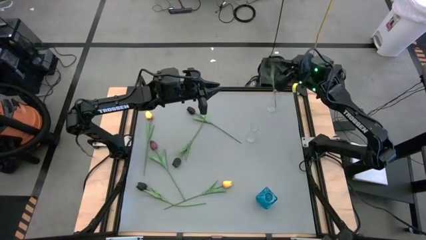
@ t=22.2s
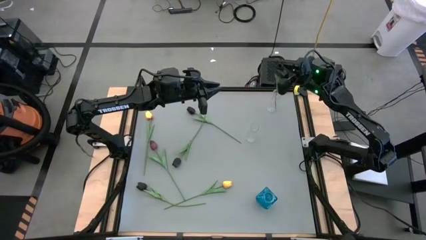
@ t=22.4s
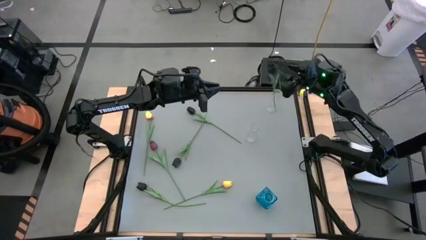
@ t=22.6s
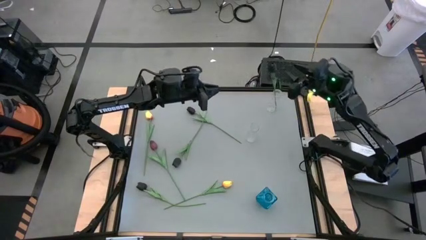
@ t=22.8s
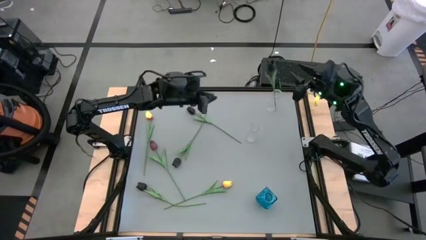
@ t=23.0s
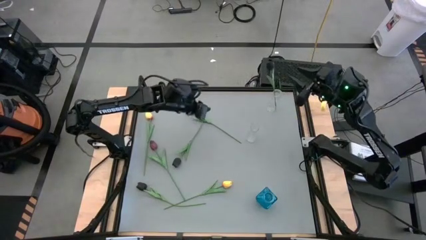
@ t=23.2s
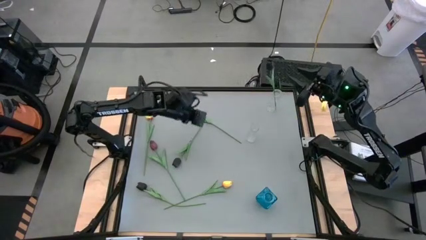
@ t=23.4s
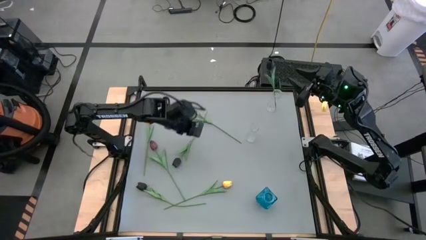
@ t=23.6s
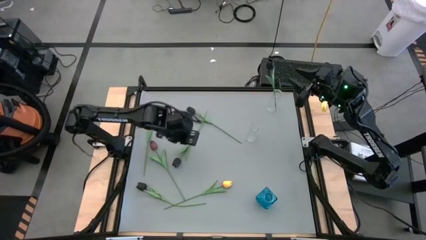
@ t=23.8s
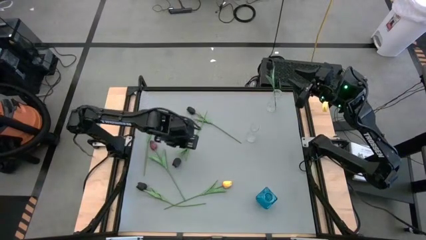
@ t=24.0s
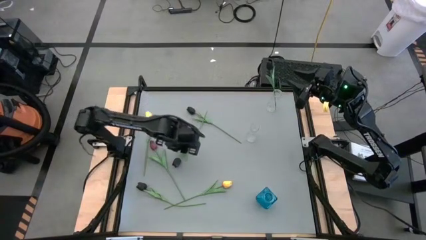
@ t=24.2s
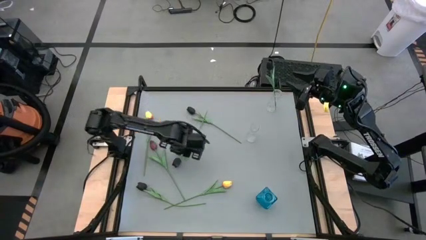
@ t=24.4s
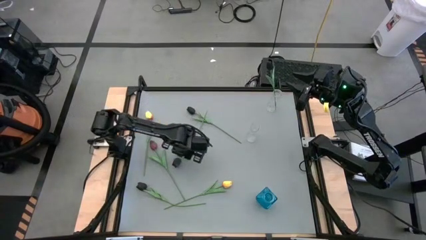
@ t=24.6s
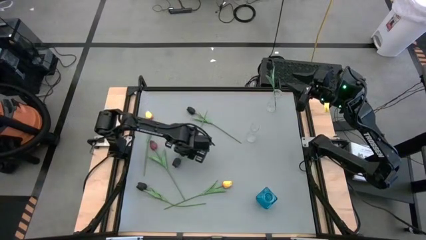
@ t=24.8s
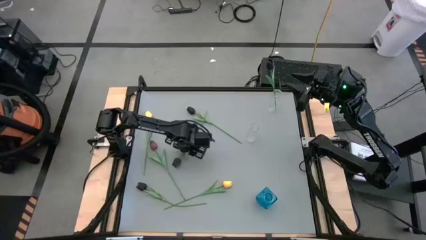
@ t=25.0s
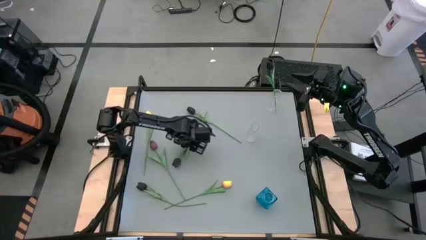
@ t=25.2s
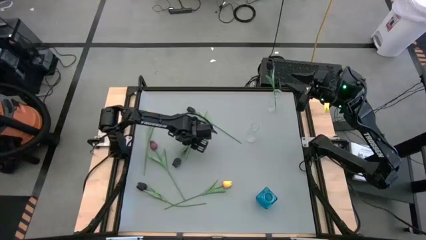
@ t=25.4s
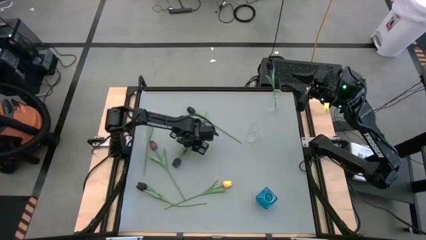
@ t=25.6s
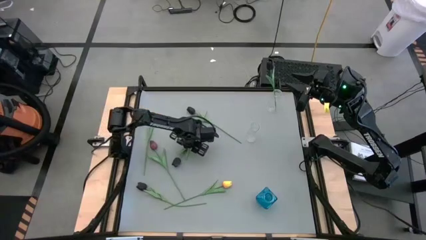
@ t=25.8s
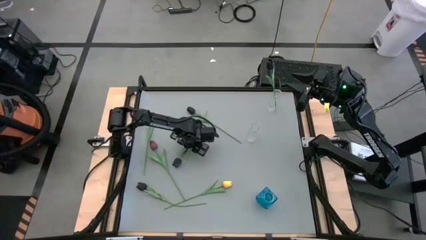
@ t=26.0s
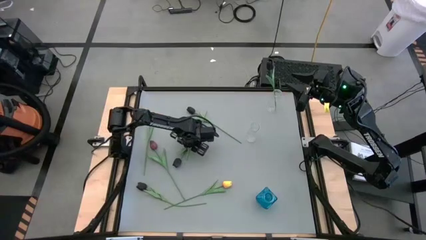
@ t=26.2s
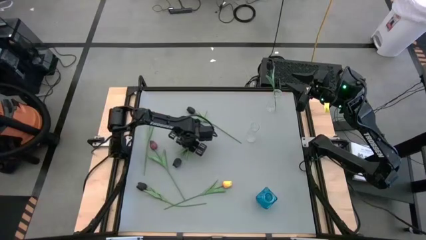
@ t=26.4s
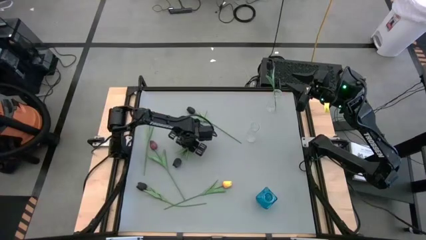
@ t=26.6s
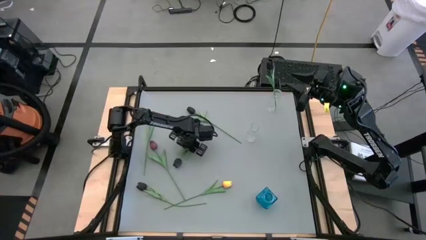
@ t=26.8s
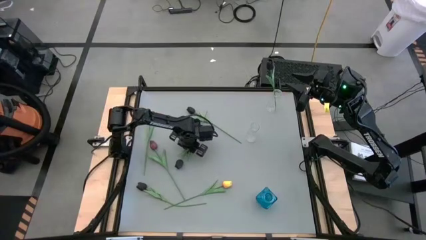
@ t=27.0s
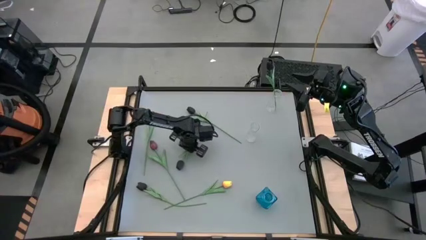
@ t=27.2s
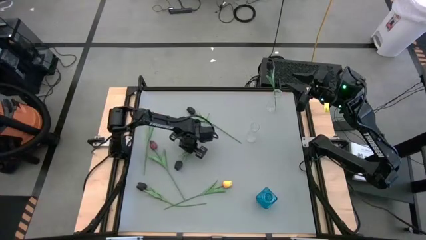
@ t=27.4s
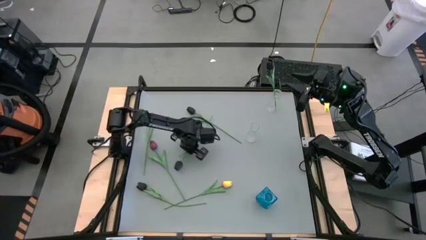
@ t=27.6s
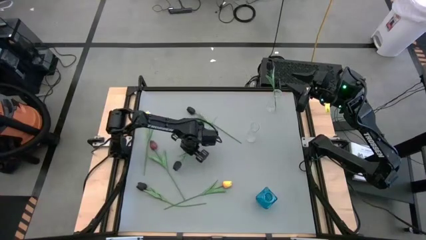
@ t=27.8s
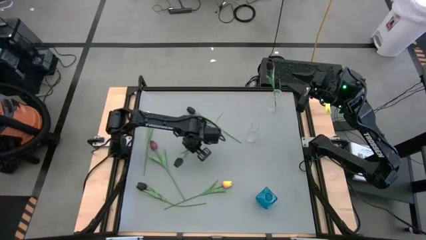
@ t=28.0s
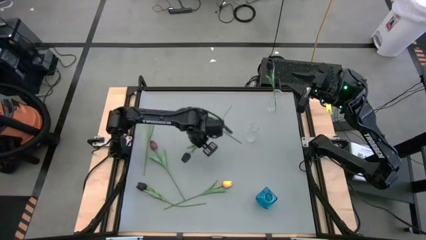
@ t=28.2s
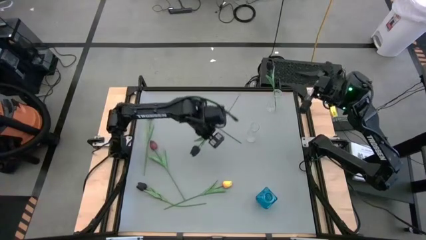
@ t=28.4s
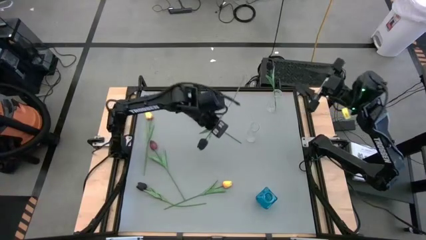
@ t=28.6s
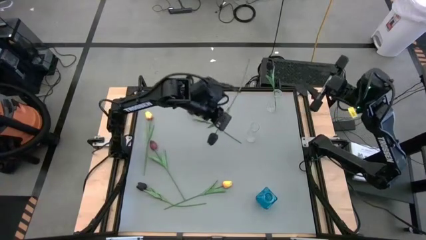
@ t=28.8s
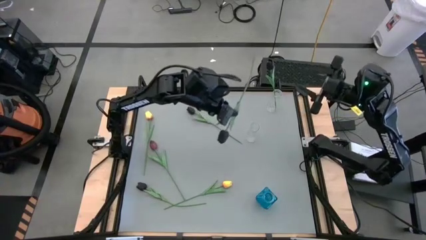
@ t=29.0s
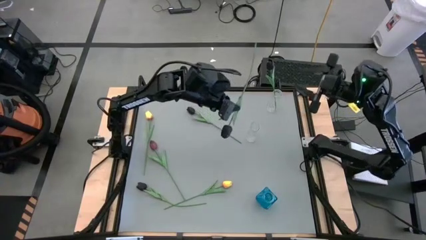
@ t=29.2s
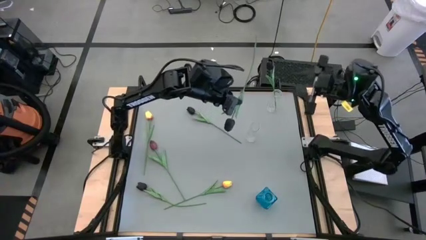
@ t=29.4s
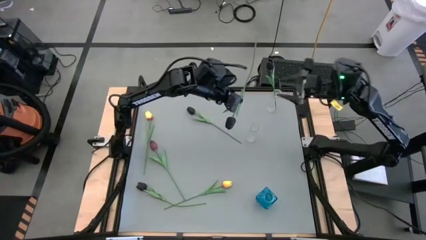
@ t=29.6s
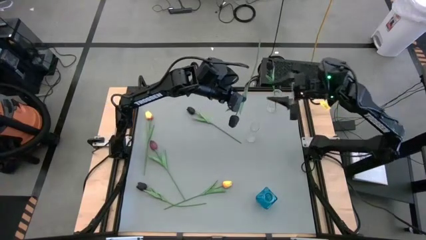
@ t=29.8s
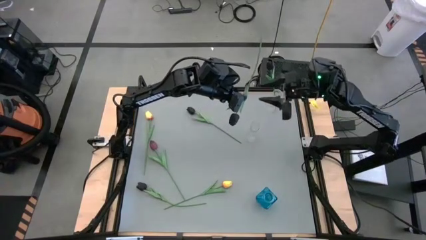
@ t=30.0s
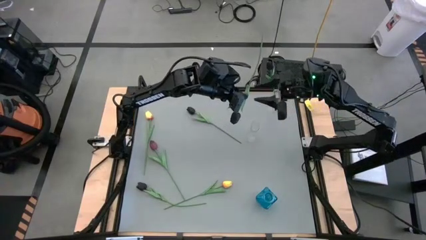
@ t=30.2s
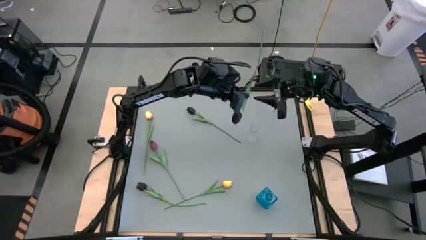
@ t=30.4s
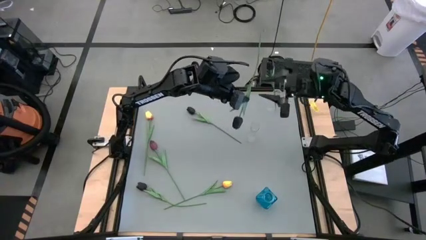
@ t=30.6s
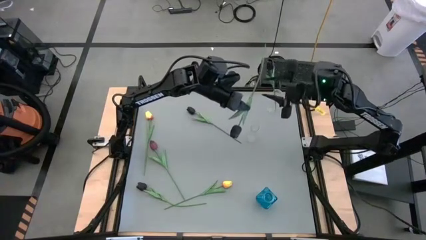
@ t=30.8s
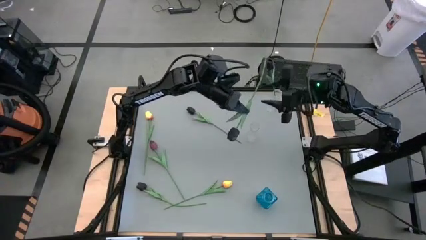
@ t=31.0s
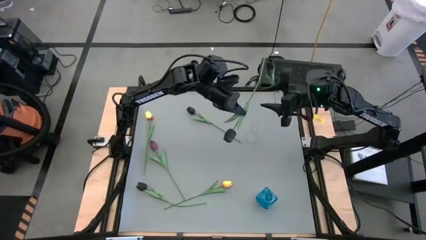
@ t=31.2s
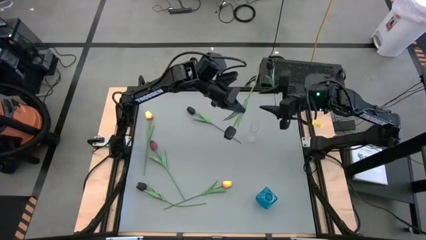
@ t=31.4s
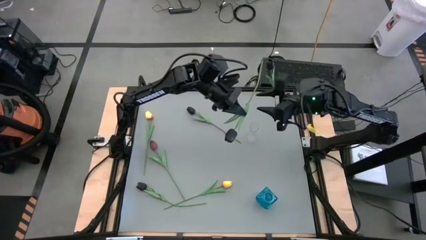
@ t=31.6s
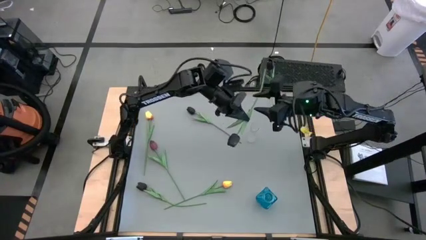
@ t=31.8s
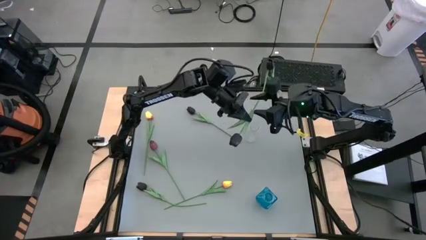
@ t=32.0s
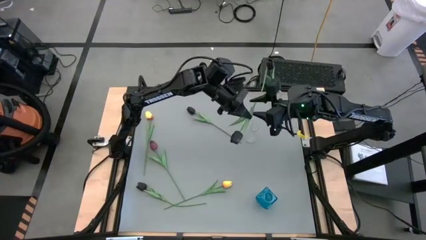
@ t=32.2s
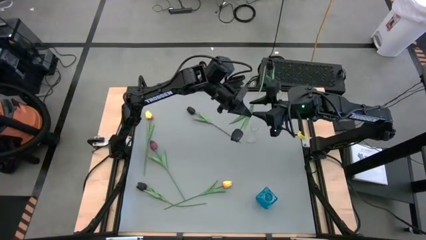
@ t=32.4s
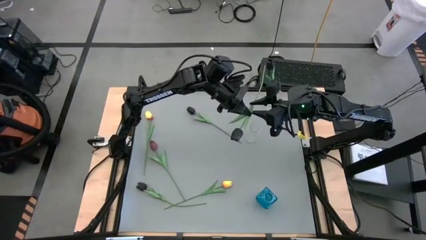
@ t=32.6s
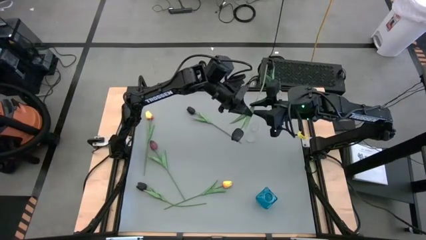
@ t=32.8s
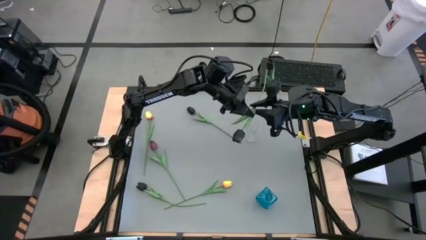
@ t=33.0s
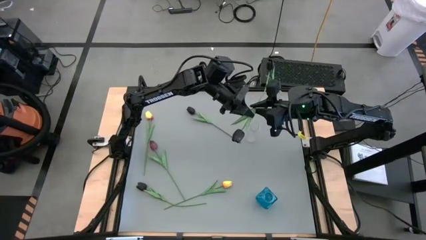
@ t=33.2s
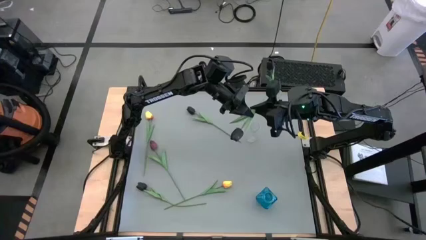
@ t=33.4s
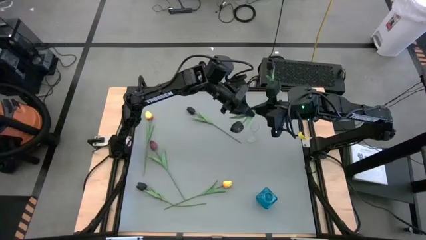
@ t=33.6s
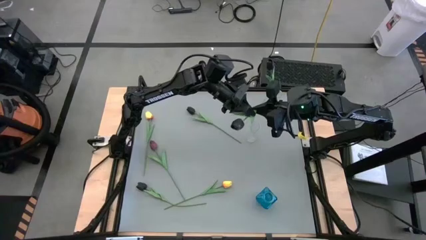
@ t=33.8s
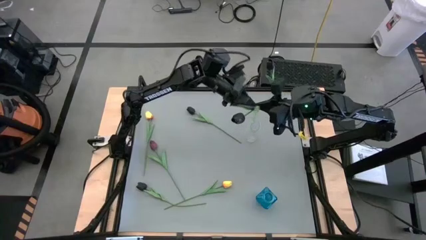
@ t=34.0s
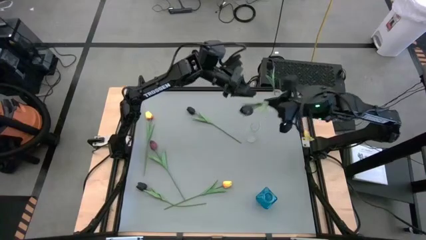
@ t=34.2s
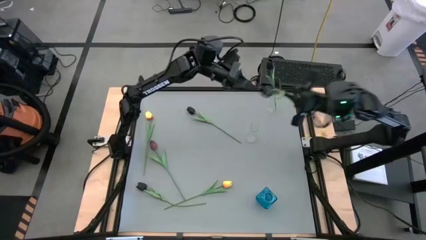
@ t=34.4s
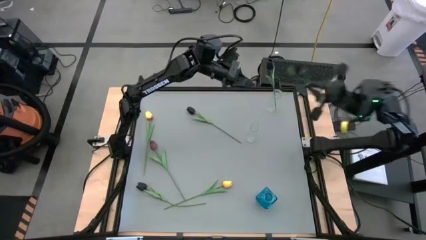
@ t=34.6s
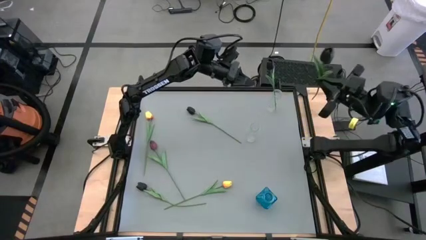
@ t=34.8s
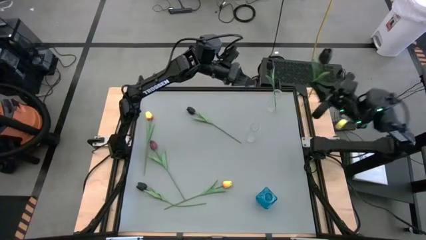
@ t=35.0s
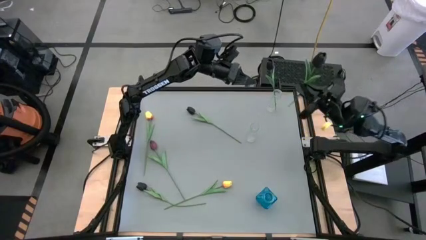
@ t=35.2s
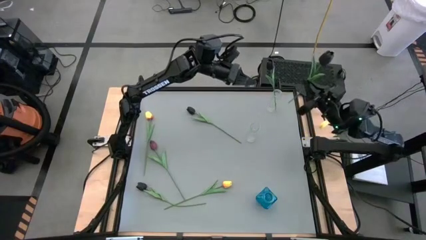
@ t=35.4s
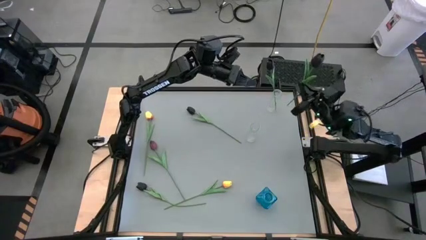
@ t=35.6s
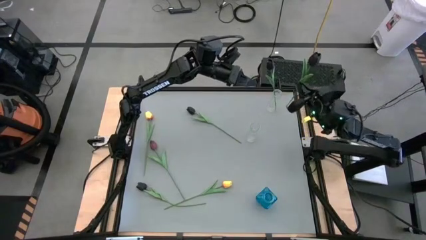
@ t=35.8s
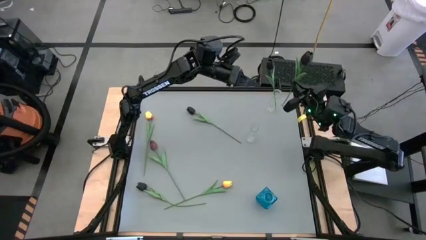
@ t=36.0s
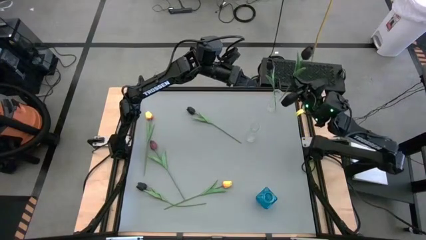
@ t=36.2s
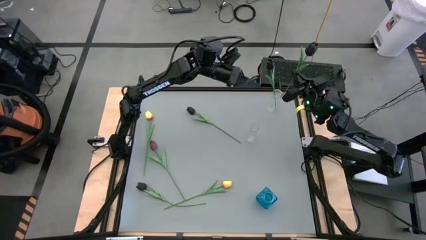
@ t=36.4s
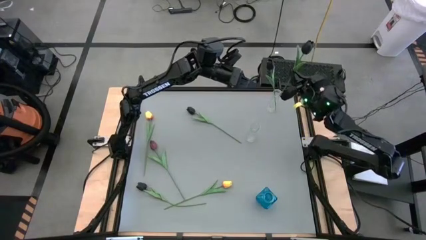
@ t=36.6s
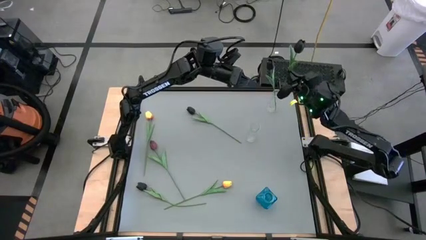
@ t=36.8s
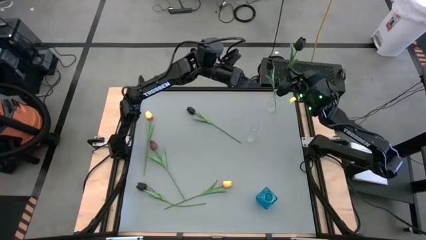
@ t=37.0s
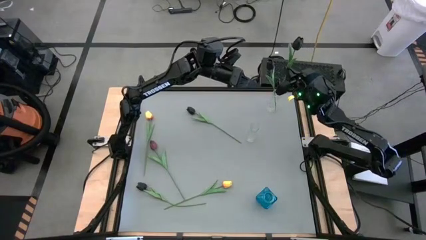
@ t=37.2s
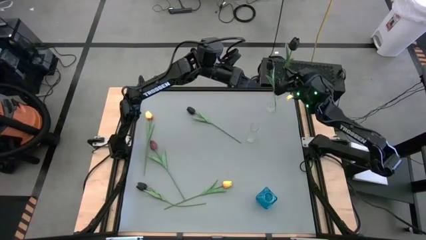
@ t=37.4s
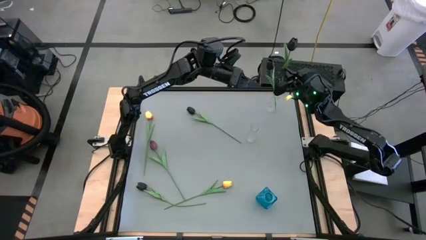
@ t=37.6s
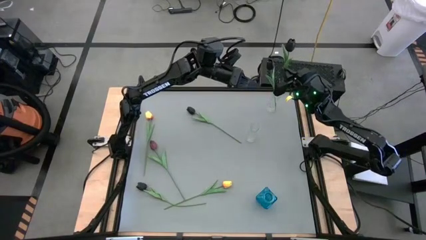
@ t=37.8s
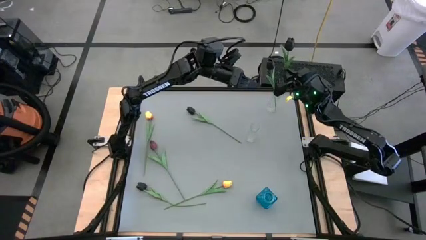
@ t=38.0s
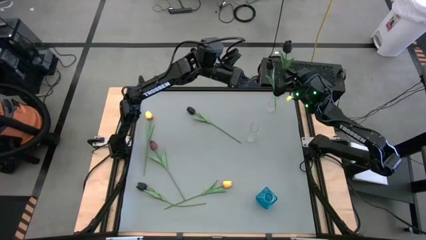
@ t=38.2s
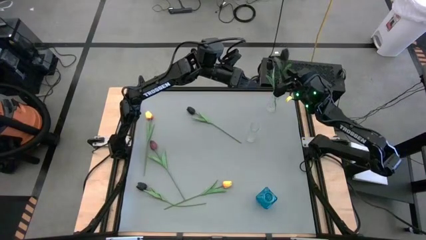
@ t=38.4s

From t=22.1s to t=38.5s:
Task: Sort flowers into vase by color
Put the middle black tulip into the top transparent vase
